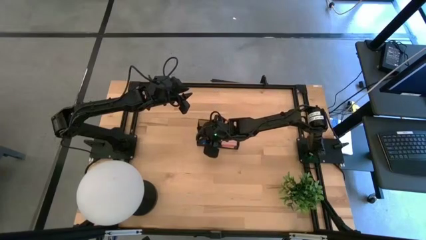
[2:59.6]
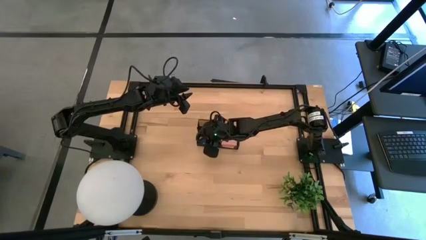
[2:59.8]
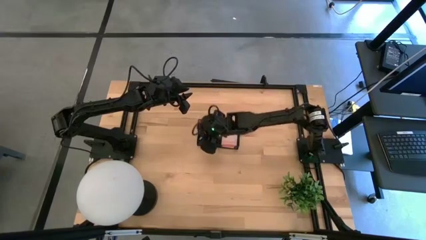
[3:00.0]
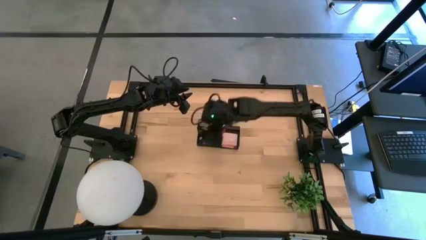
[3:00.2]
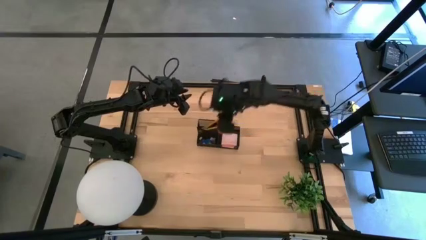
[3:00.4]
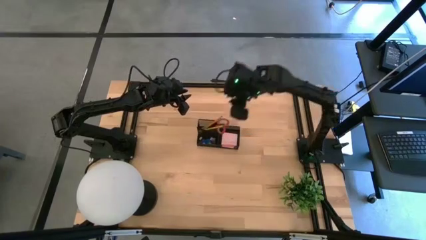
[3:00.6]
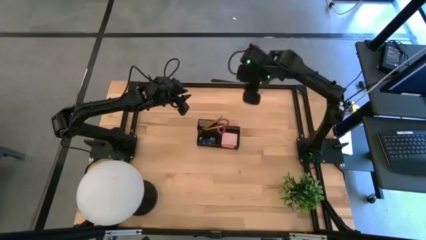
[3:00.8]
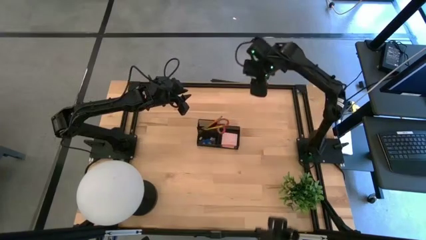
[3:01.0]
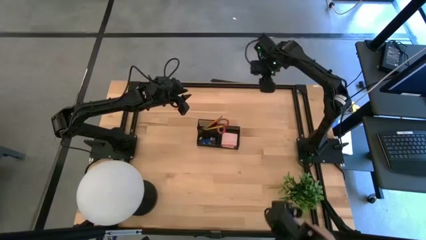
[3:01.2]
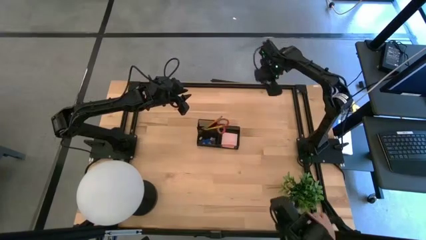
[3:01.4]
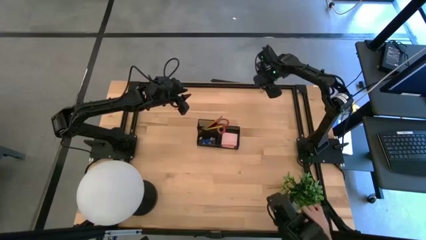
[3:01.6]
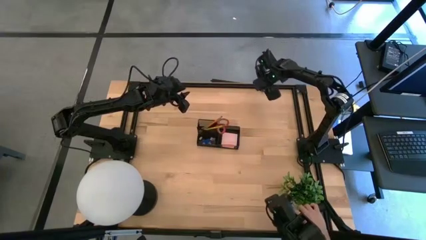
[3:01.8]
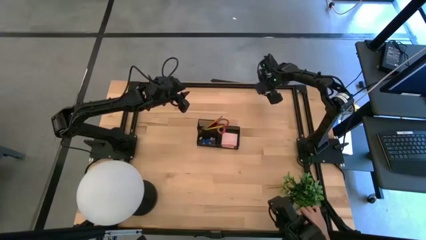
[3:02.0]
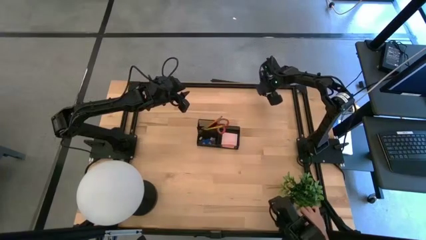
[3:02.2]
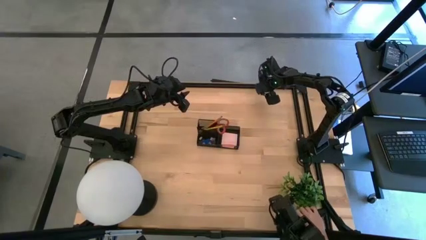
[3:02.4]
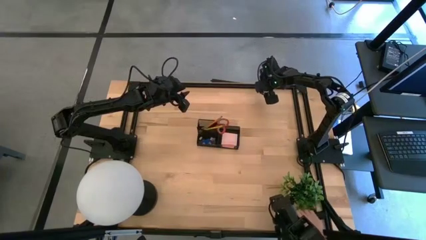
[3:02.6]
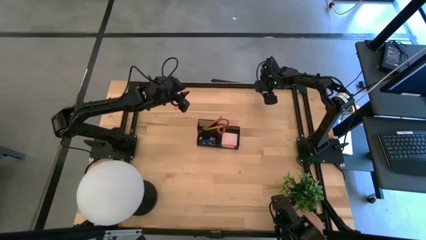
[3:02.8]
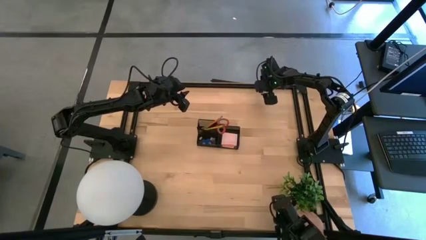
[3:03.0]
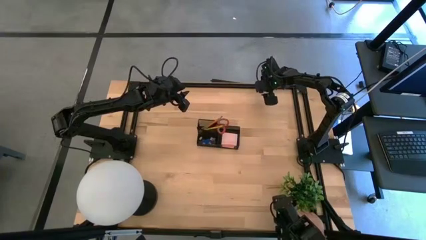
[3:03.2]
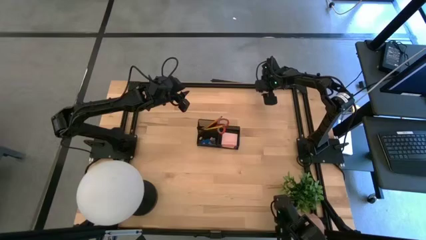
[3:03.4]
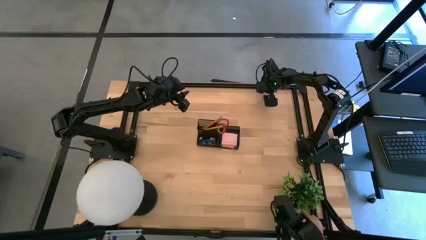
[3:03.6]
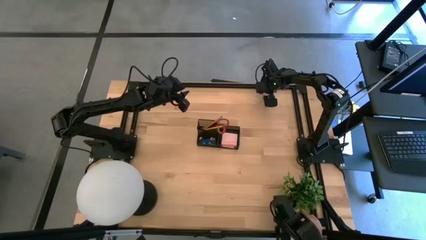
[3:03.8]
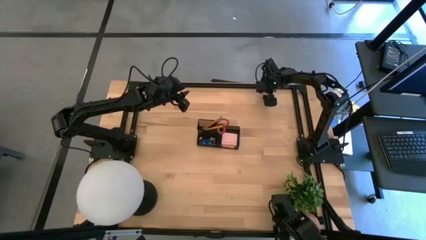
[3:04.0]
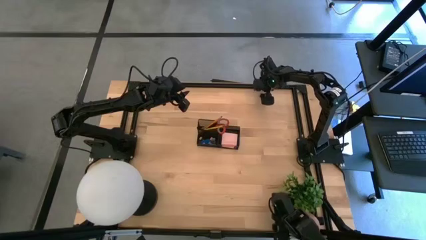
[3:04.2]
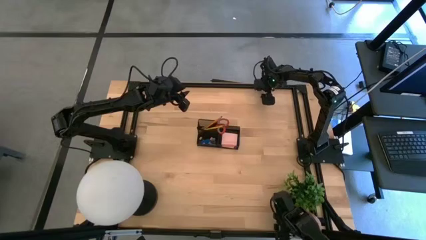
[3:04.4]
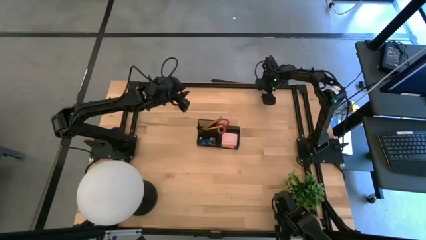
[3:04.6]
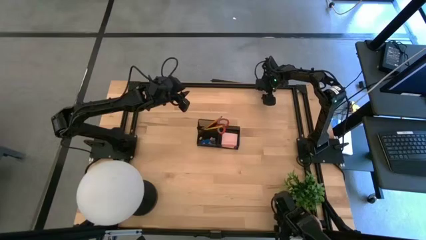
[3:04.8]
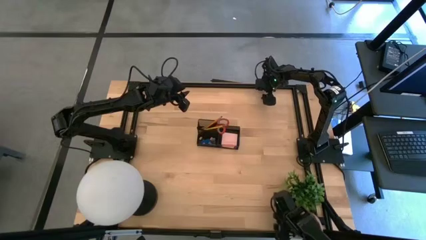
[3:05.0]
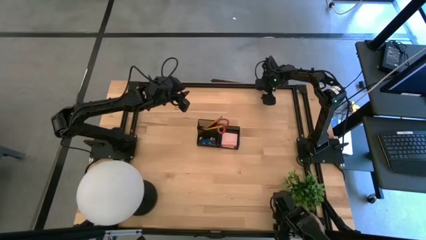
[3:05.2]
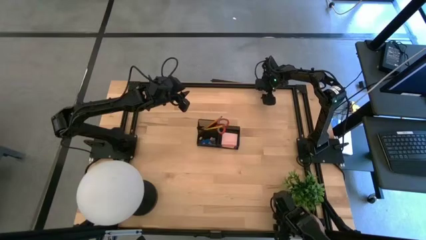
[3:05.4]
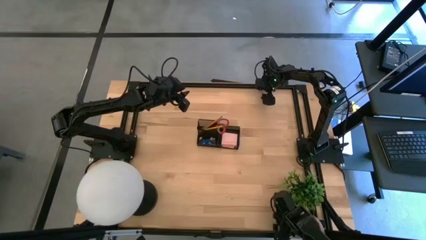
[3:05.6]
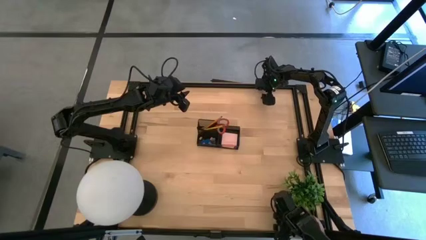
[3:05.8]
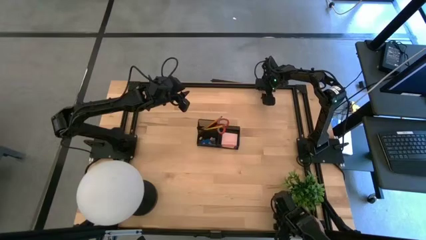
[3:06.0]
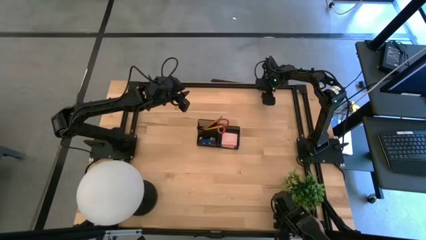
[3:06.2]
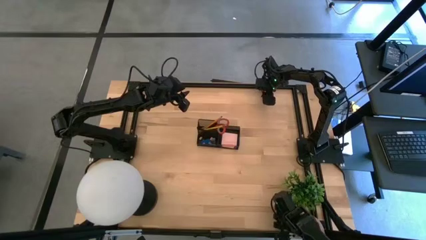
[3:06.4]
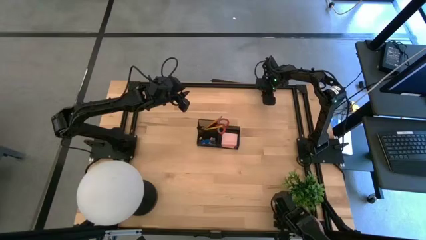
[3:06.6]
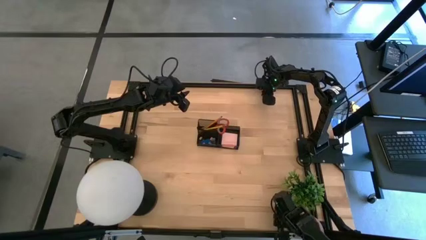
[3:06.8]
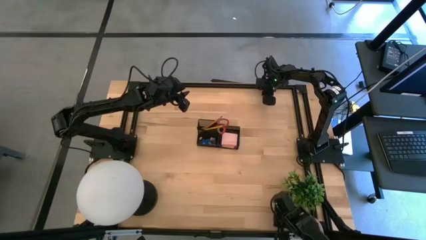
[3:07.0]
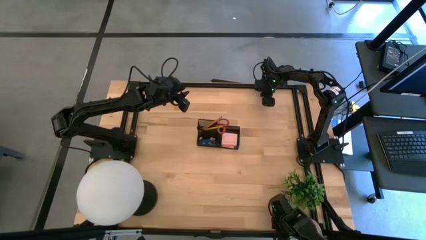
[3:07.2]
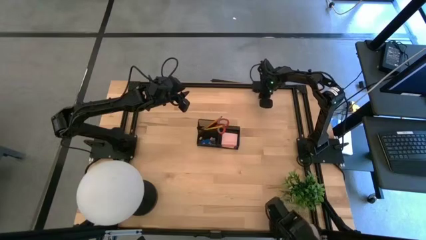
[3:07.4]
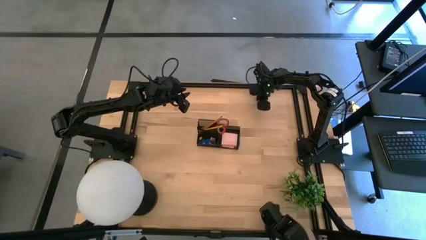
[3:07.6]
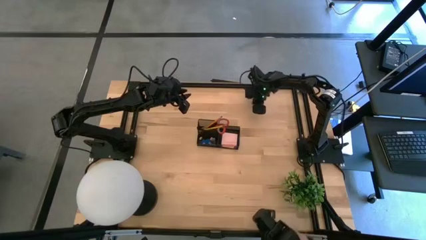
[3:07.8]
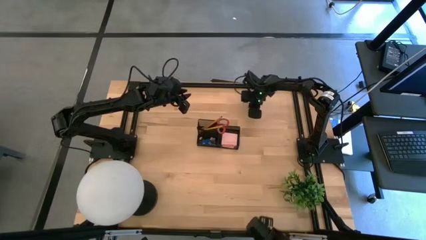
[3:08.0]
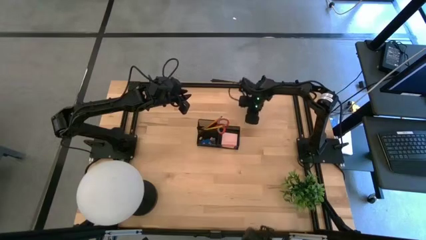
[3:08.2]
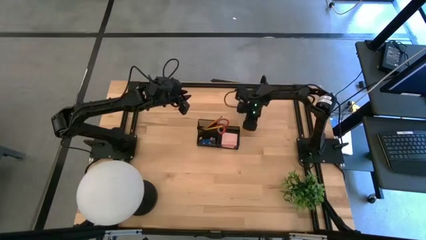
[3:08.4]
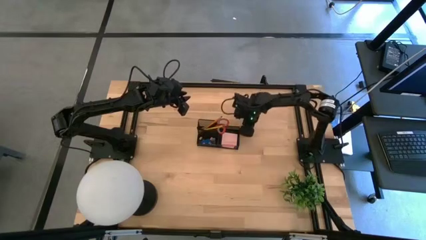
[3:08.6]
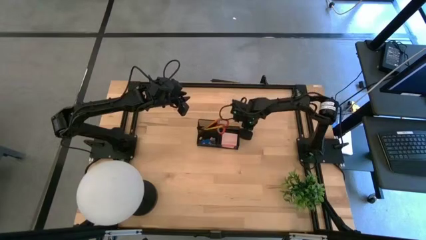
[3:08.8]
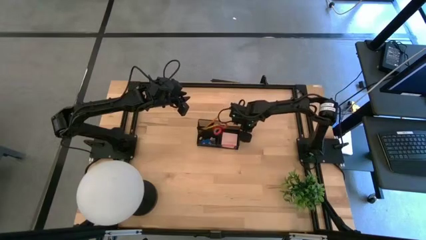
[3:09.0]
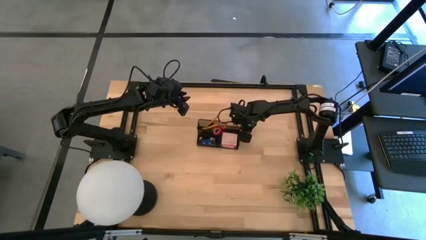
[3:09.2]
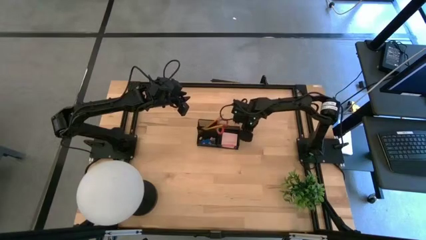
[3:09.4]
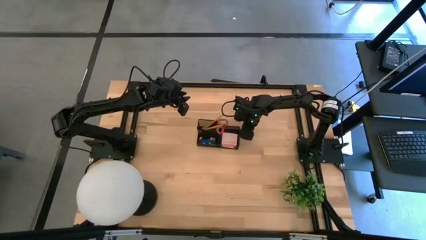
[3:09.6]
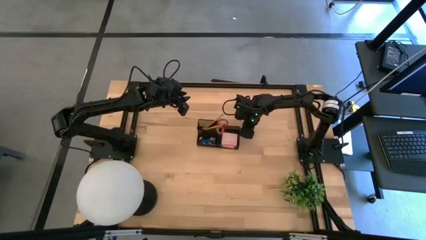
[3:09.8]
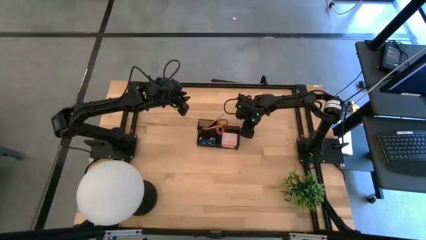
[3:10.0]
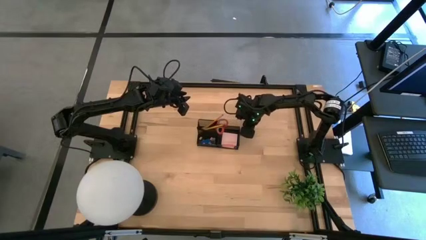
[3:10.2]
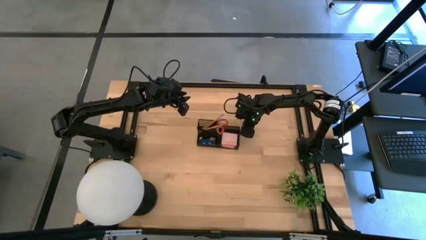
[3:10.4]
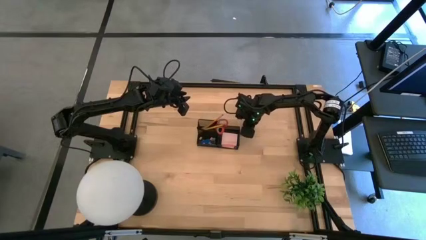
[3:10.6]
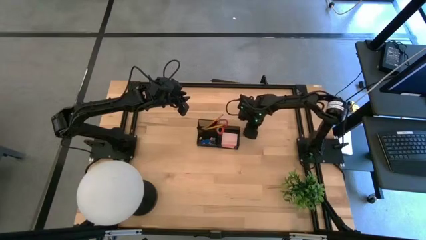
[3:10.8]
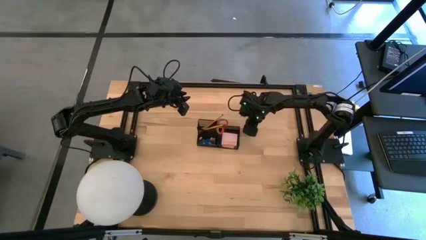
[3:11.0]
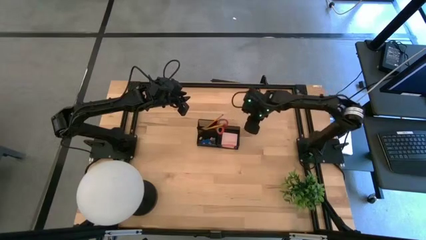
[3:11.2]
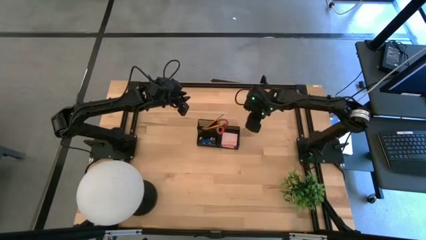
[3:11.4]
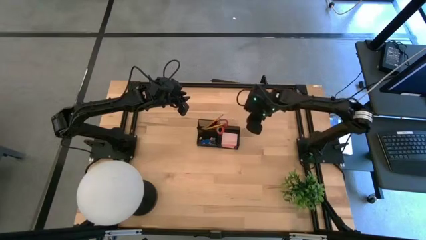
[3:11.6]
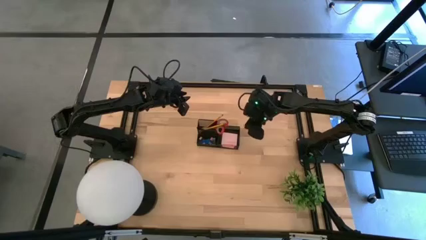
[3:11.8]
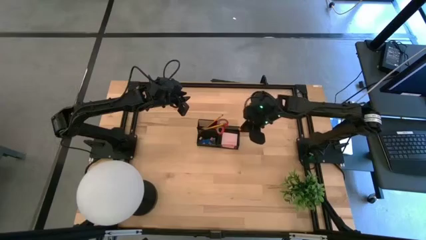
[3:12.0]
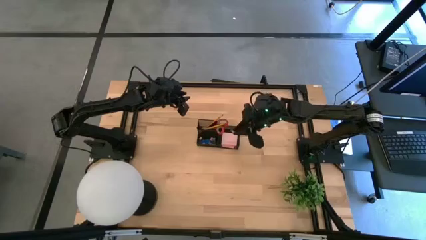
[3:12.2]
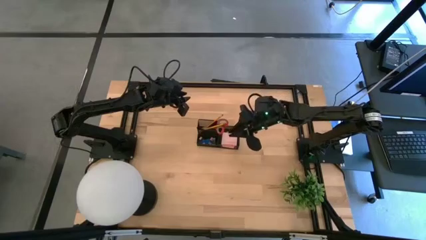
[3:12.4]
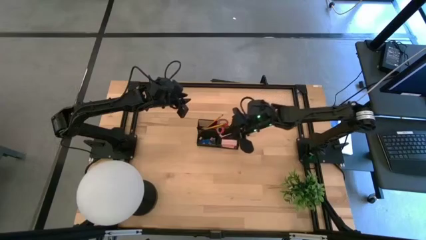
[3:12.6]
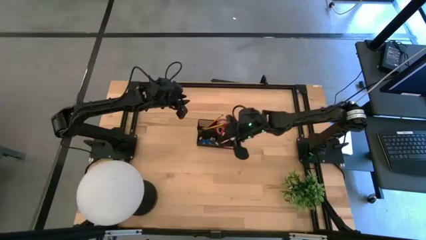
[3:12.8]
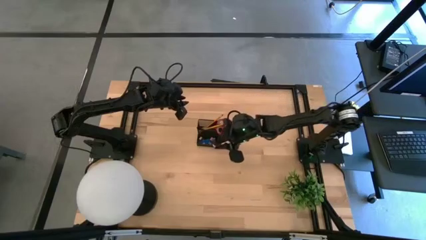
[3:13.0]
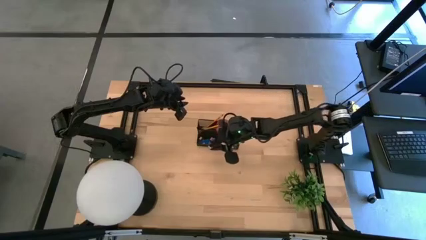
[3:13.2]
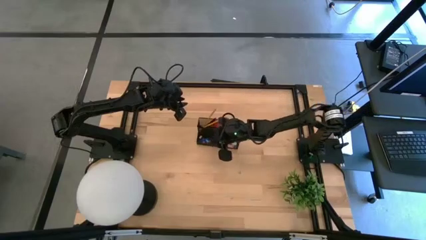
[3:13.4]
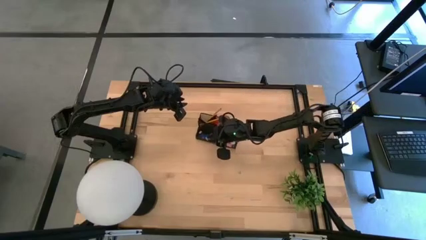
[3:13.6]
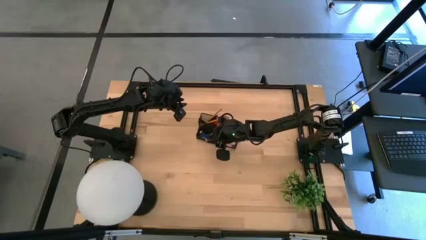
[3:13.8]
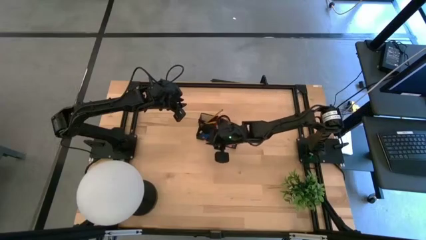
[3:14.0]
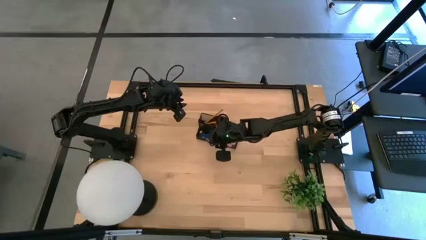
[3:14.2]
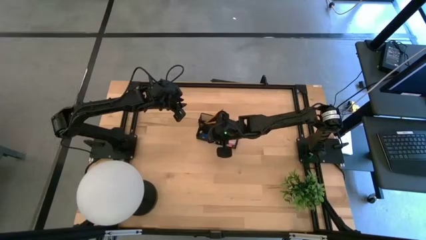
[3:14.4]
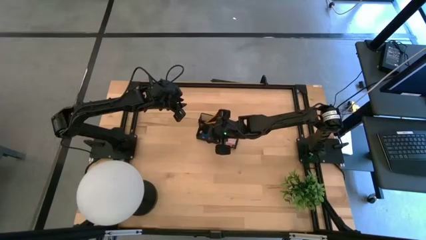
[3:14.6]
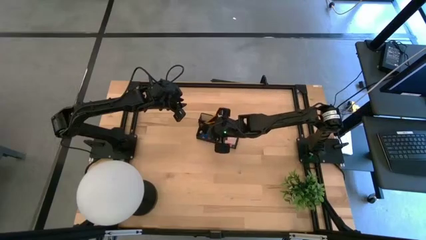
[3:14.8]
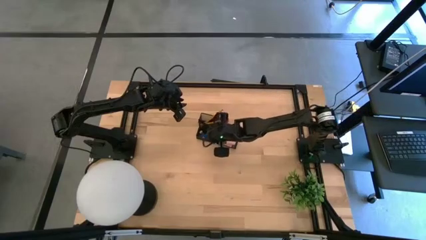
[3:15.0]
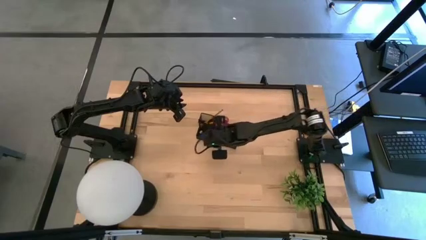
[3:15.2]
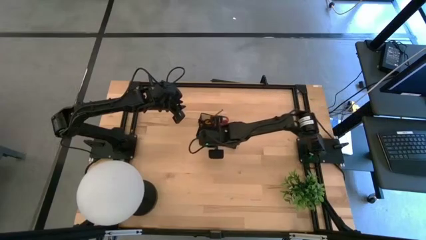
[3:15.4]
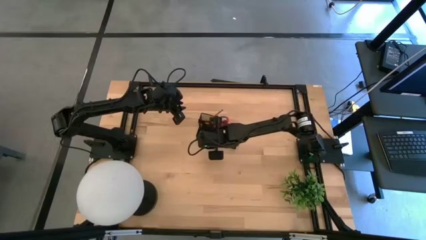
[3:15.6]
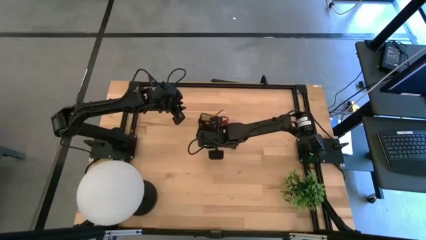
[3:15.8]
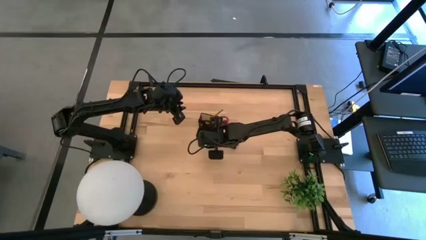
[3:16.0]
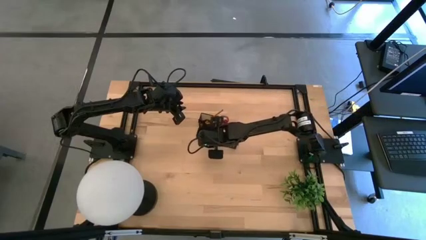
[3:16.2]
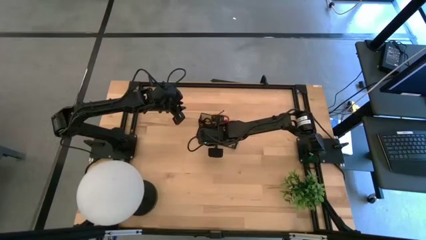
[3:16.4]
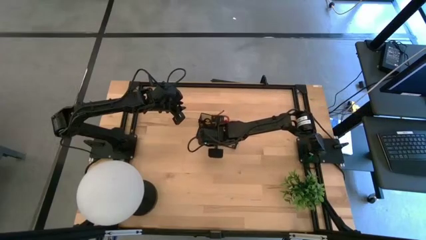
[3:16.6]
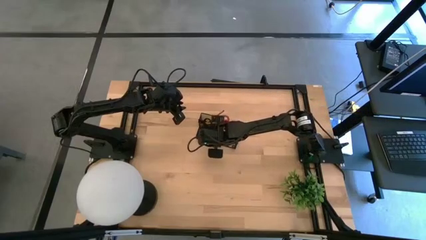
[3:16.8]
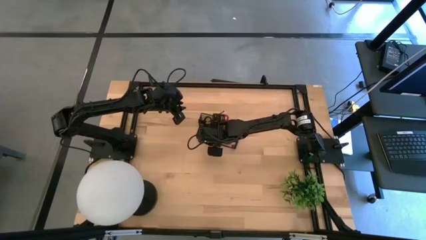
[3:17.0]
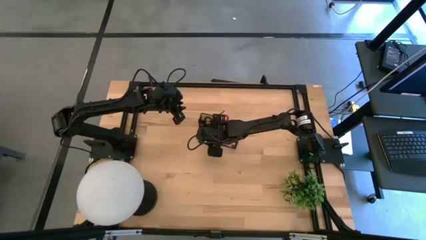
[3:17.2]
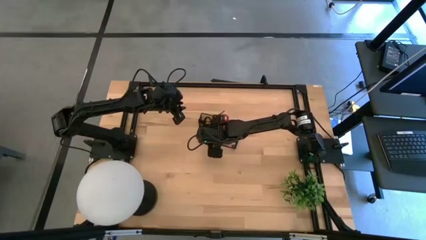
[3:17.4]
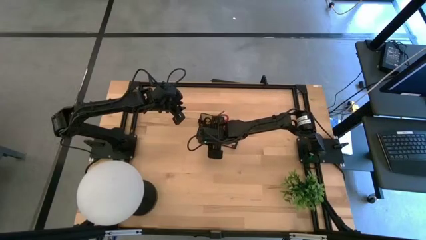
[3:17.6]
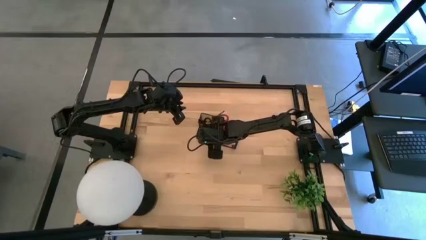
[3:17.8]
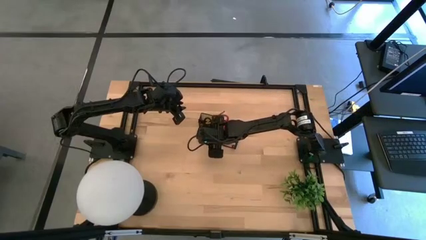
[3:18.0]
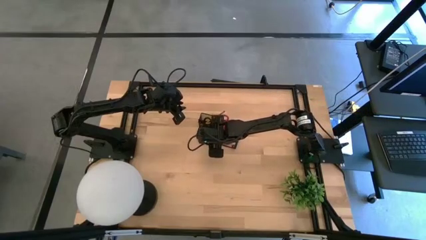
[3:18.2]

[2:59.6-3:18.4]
Task: Pick and place office supplies into organizer
Put the pink binder clip into the desk organizer
